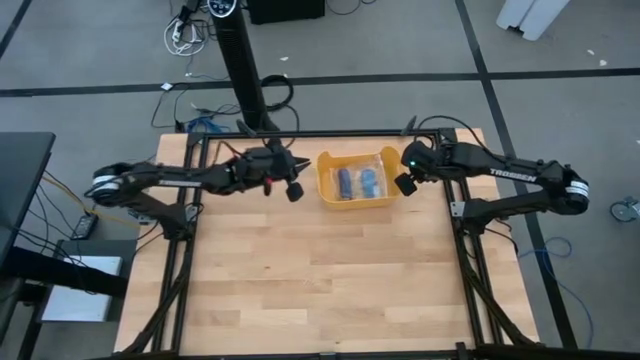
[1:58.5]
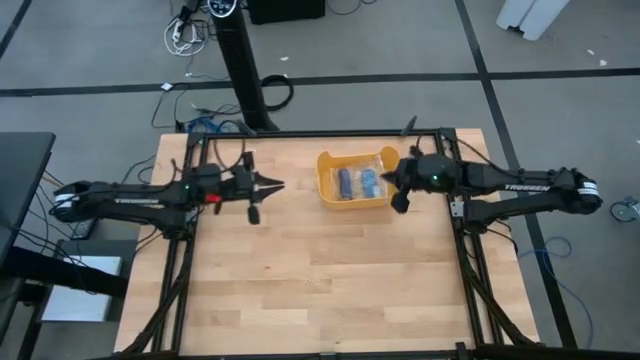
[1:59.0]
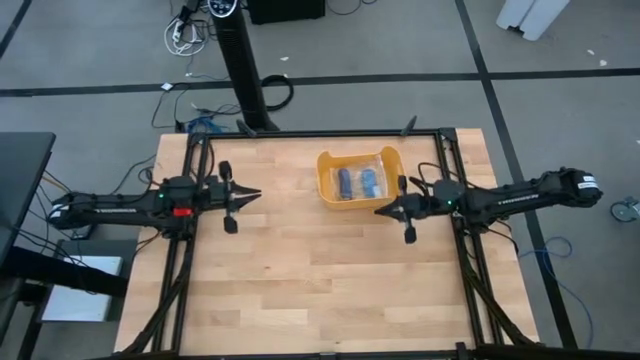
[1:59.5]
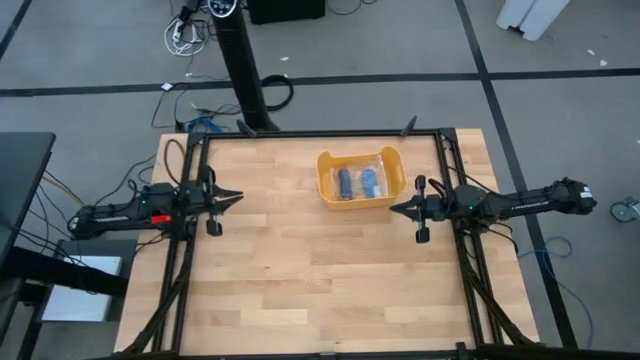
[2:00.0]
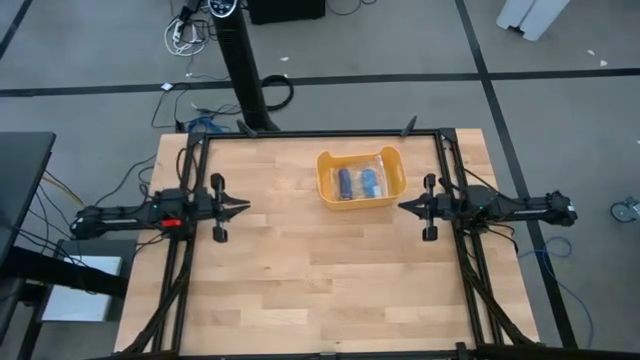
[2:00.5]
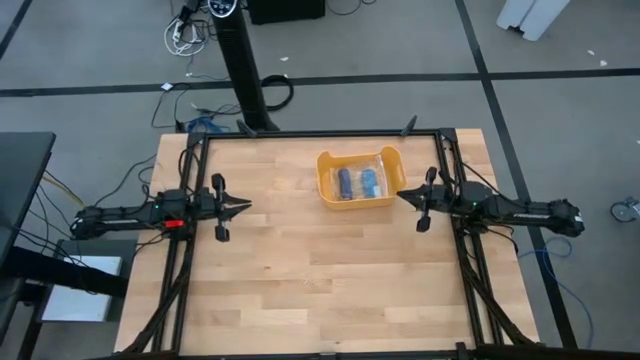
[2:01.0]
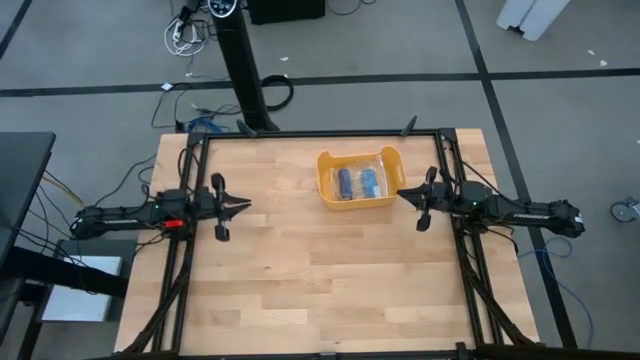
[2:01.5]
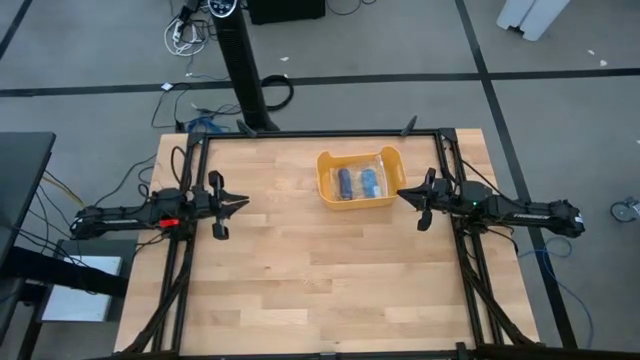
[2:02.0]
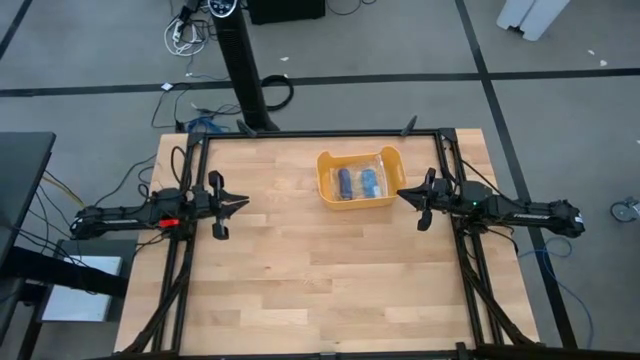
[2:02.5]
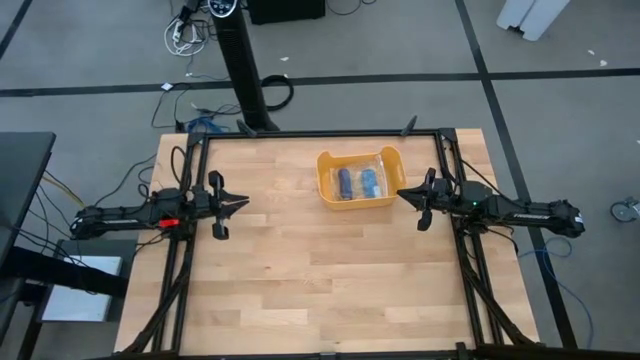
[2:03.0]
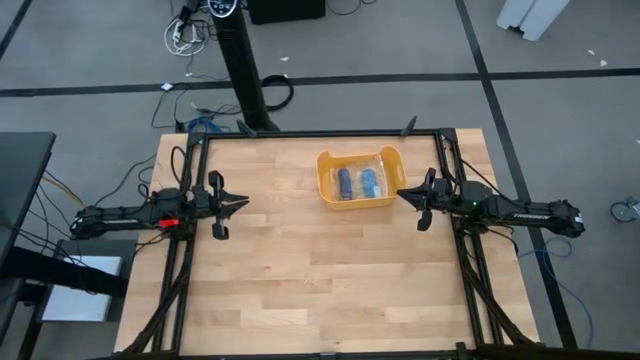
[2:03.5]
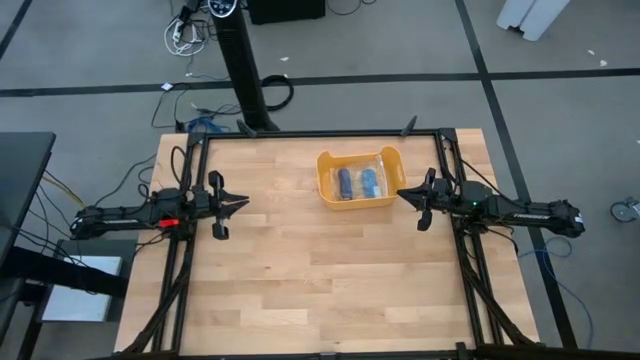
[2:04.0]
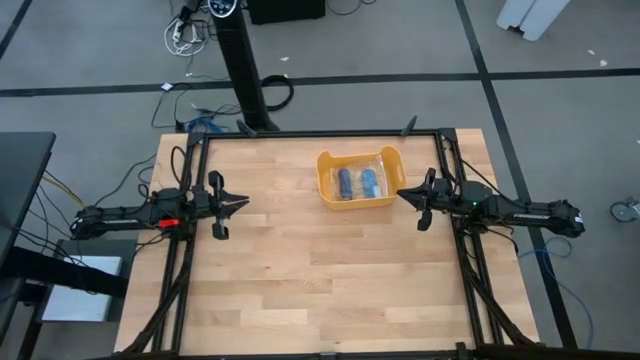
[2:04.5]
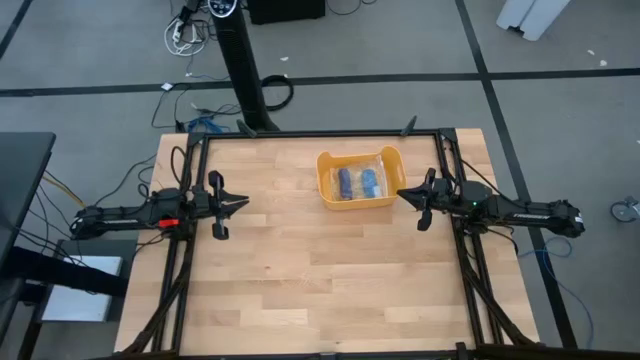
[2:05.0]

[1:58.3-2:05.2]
Task: Roll bandage
Return to Home Position

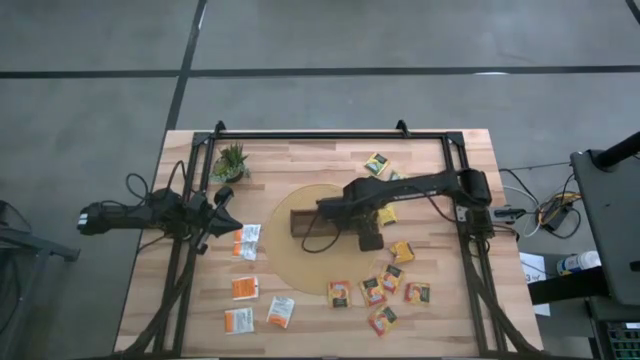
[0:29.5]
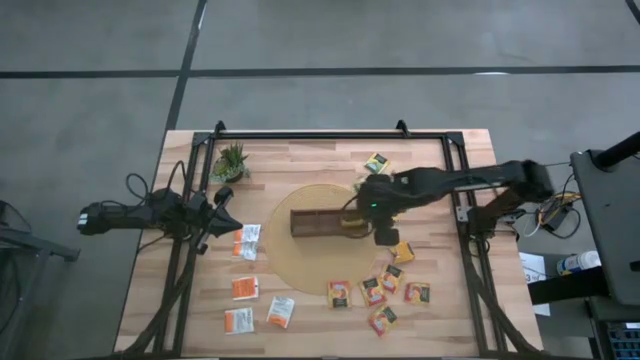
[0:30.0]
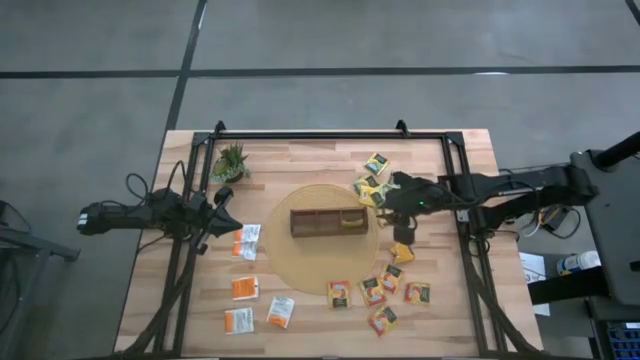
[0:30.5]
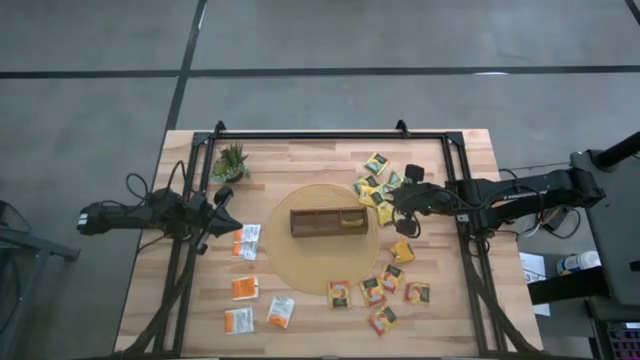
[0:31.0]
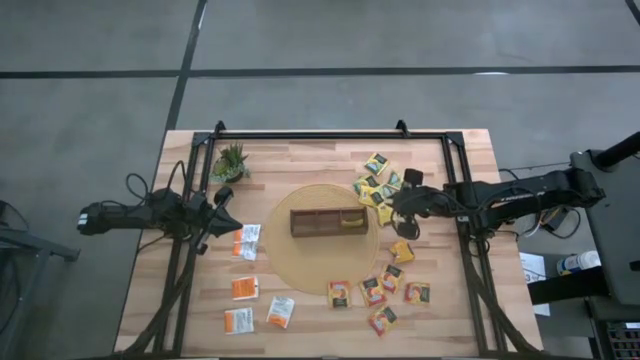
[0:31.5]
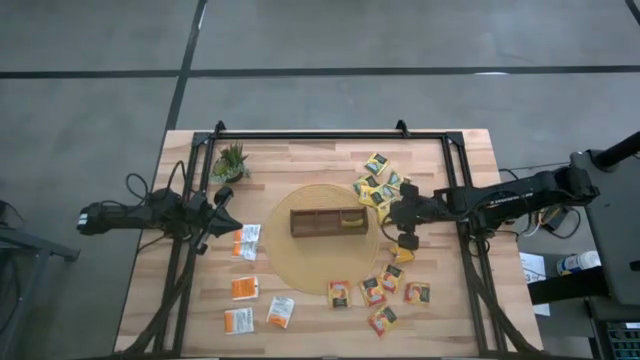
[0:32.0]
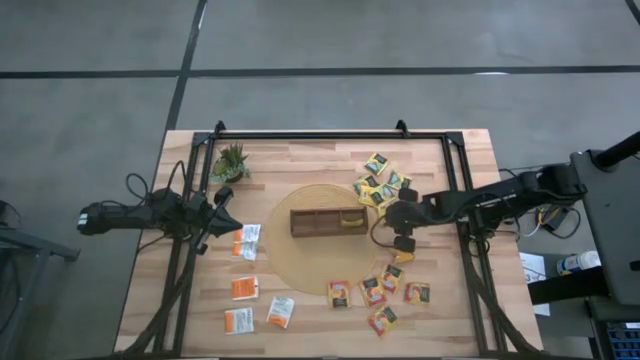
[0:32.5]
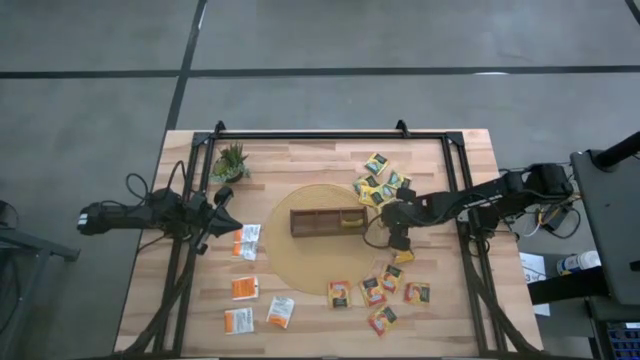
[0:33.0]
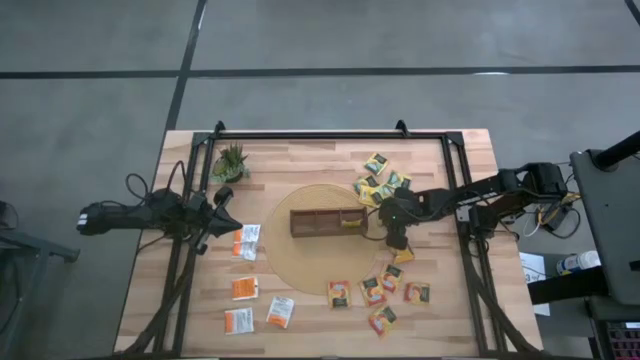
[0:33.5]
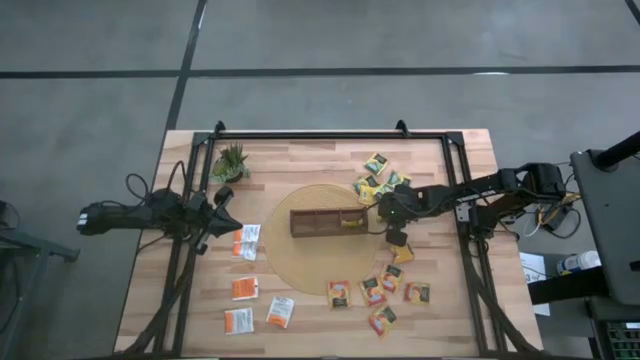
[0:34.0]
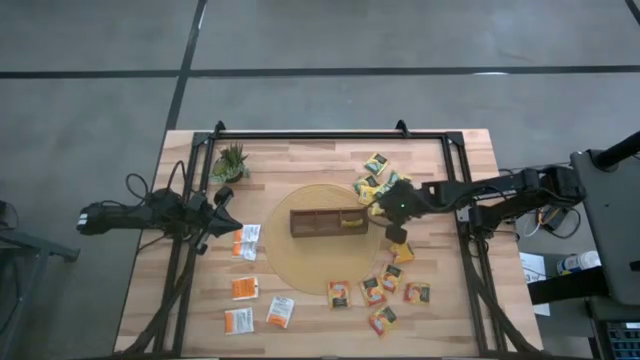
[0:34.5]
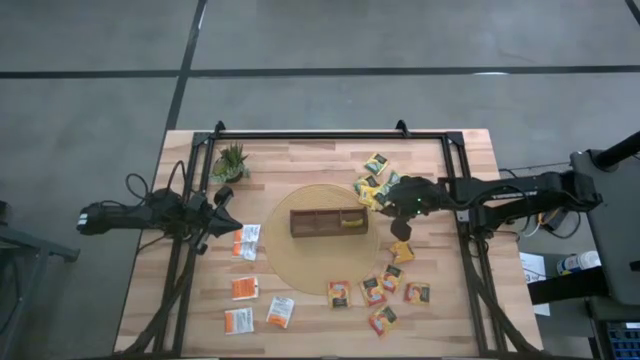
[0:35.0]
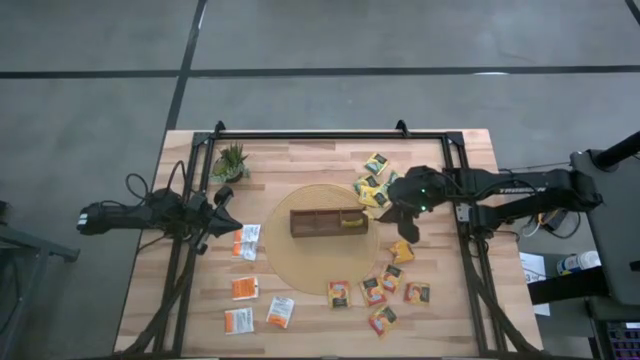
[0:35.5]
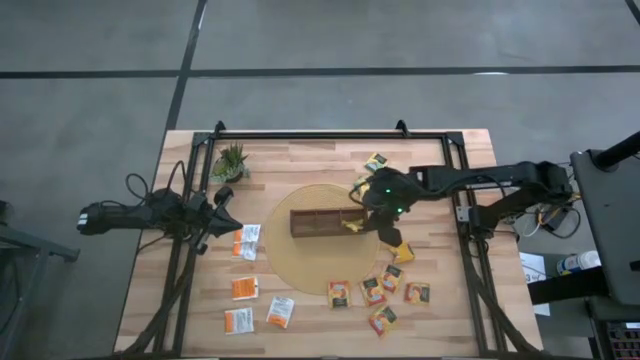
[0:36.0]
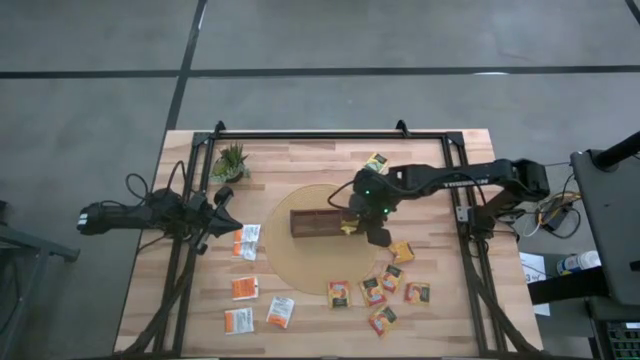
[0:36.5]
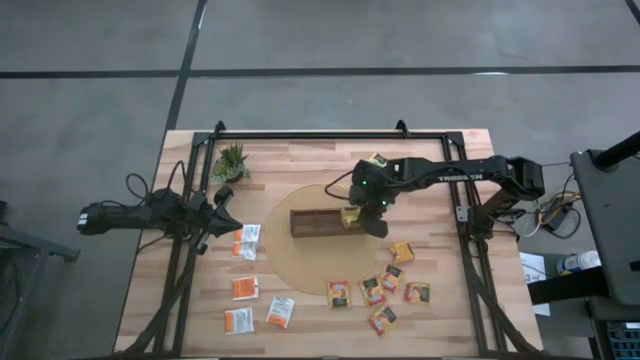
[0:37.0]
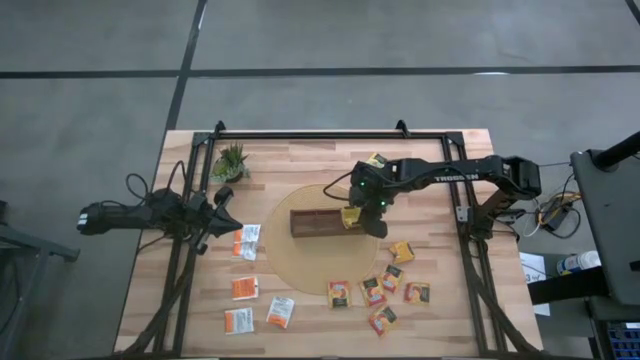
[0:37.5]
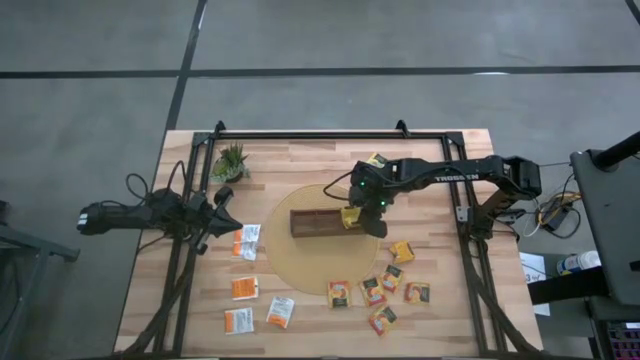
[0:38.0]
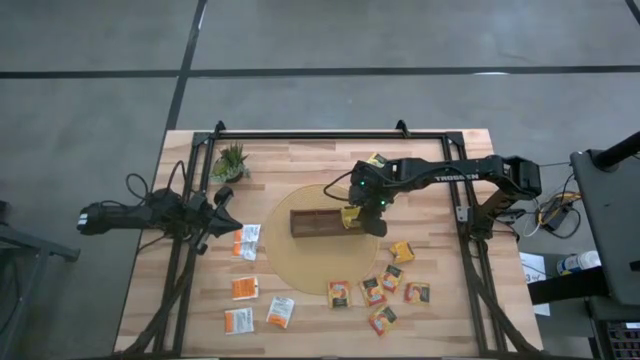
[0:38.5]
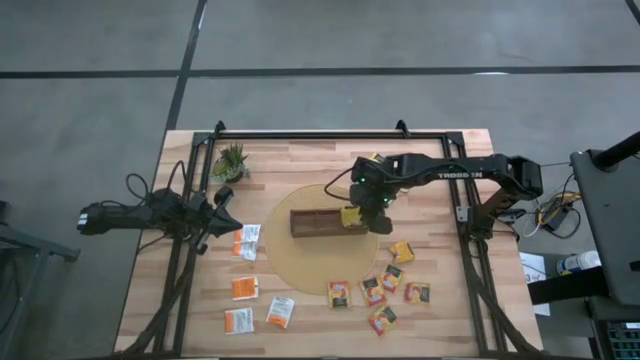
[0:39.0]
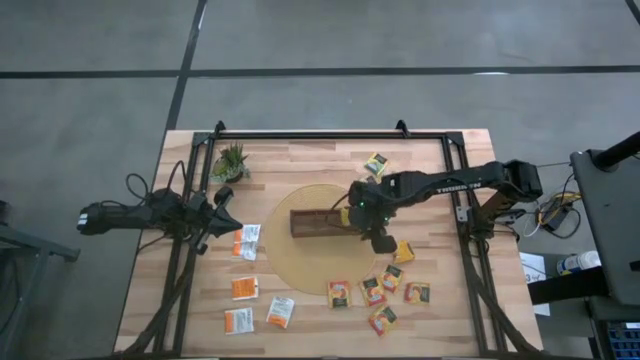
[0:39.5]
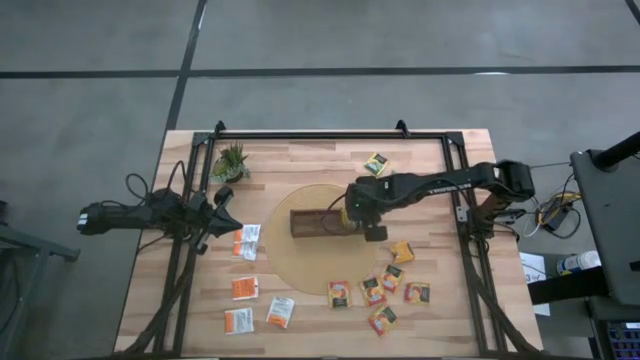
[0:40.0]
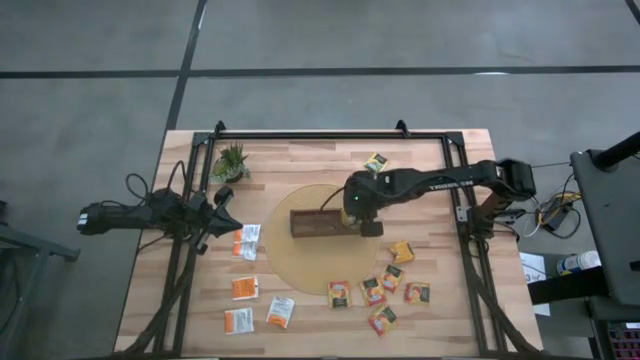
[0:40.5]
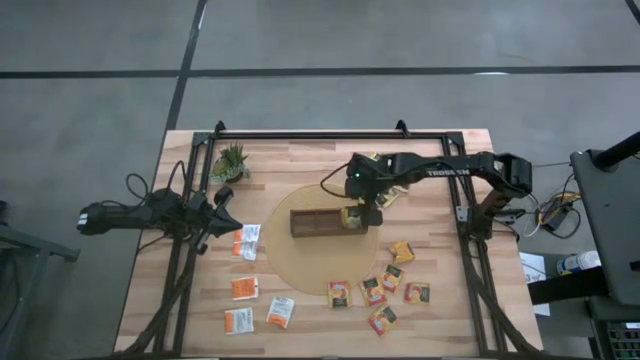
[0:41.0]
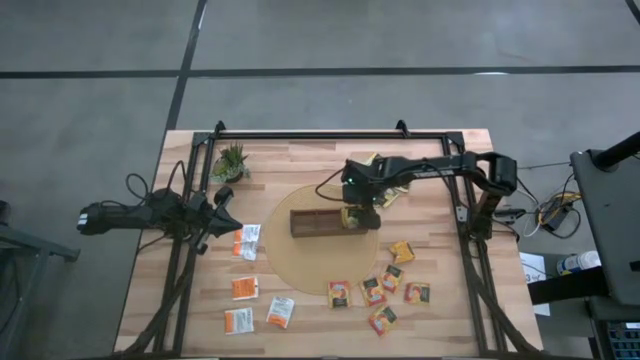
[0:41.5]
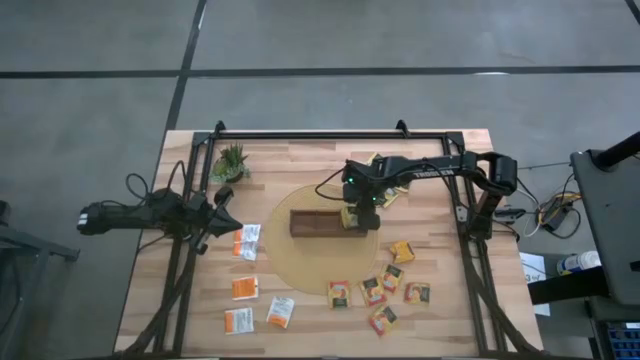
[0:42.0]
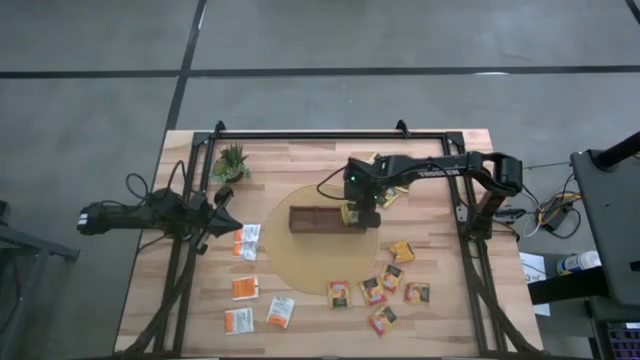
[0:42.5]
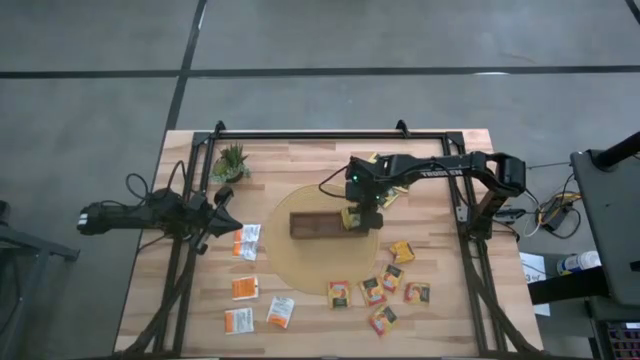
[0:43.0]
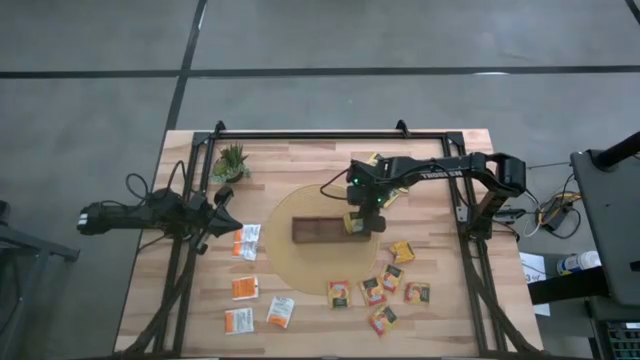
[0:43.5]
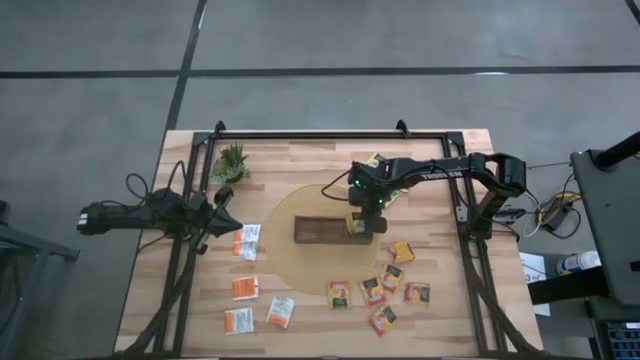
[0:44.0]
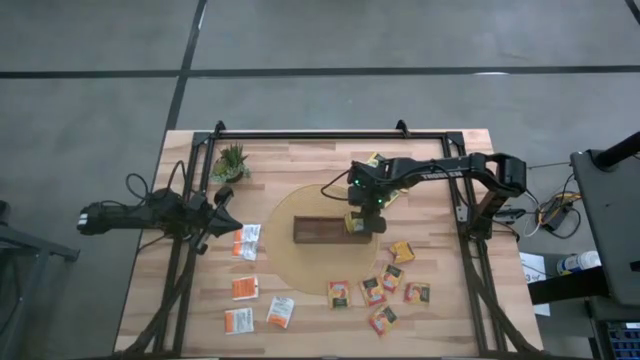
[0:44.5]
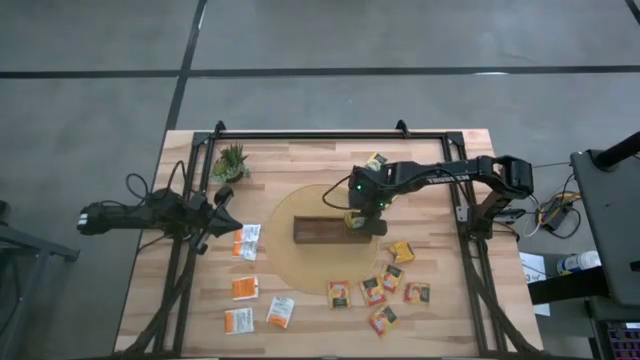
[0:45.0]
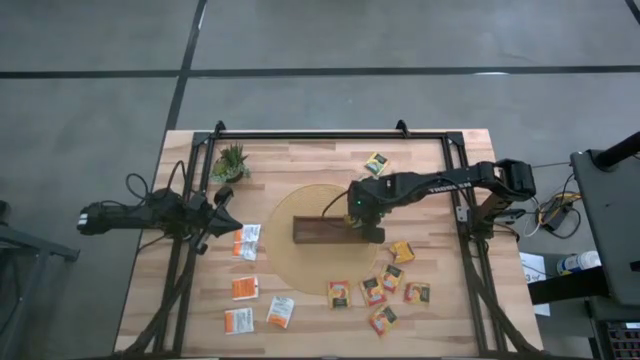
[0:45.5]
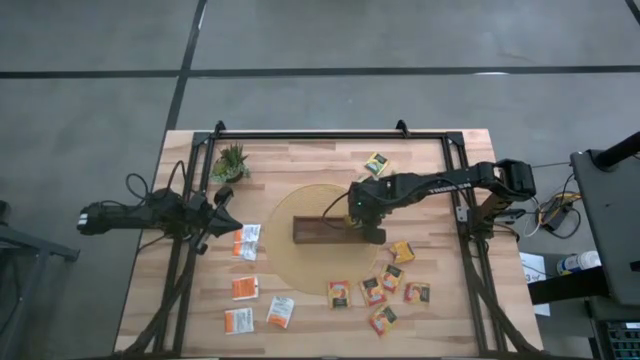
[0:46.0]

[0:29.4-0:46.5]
Task: Pick & Place Tea
Put the yellow tea bag into the right of the wooden organizer
